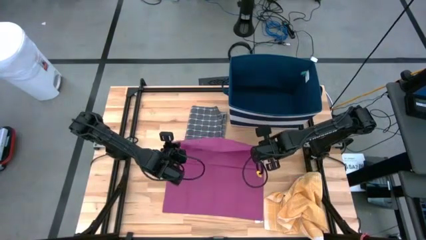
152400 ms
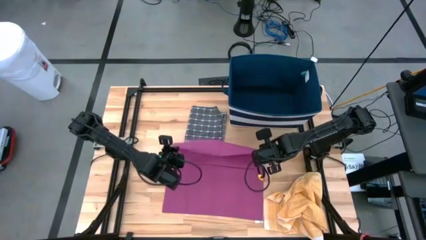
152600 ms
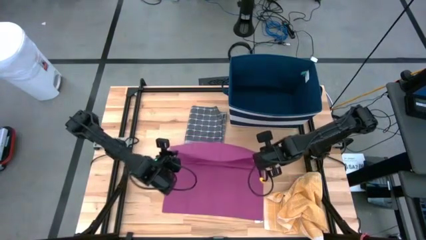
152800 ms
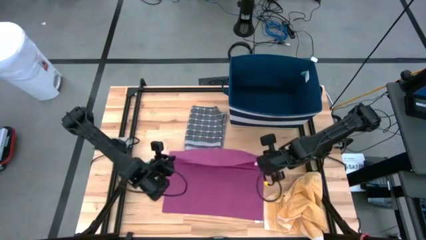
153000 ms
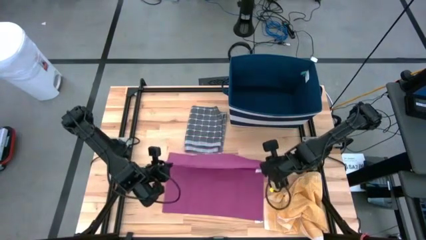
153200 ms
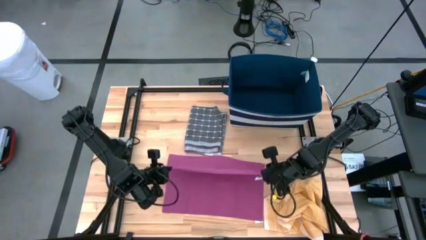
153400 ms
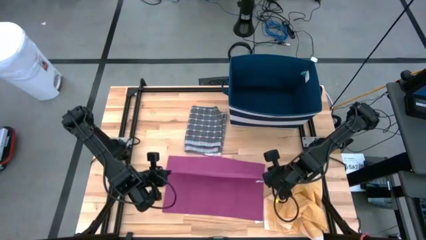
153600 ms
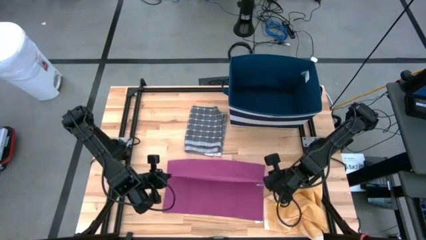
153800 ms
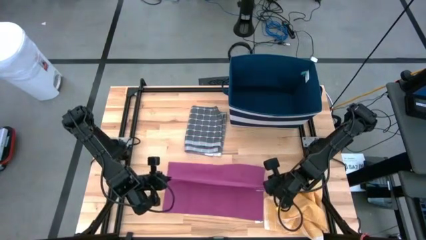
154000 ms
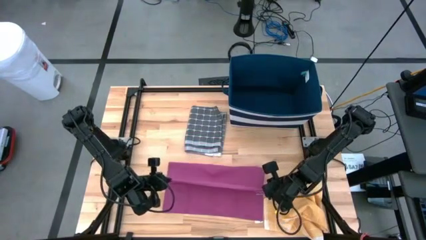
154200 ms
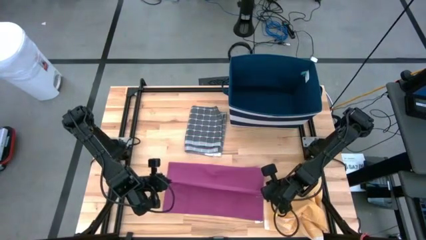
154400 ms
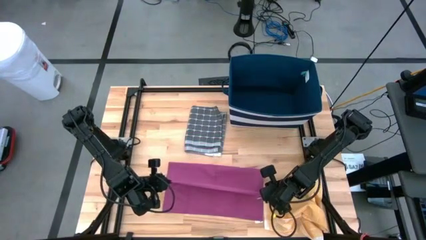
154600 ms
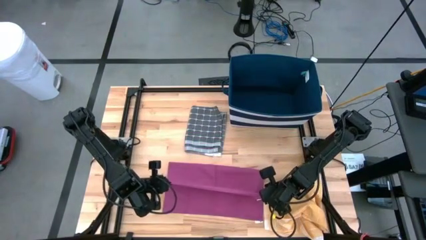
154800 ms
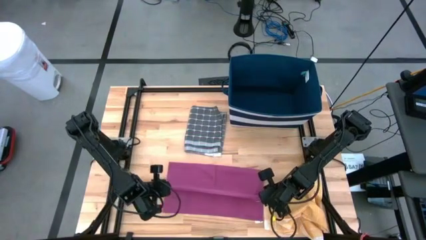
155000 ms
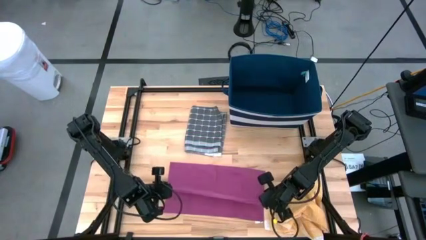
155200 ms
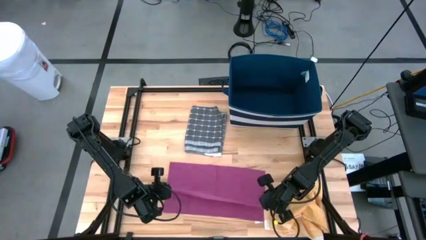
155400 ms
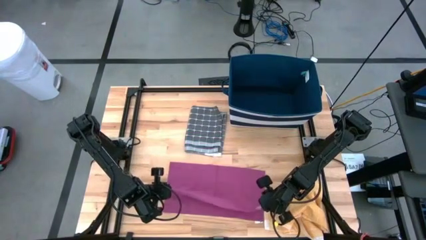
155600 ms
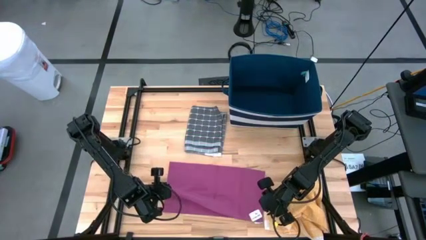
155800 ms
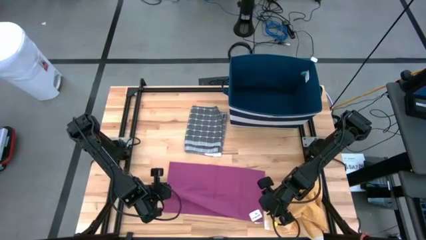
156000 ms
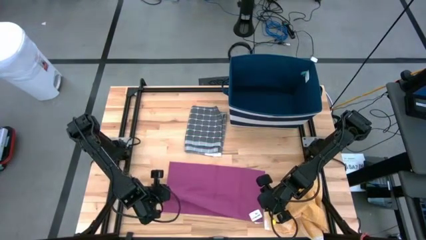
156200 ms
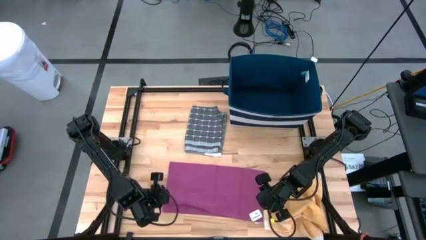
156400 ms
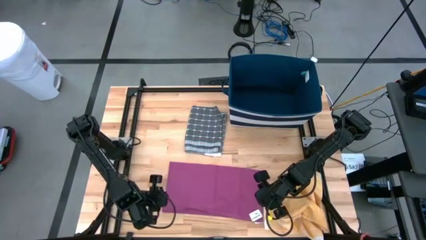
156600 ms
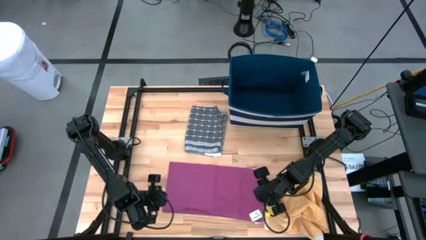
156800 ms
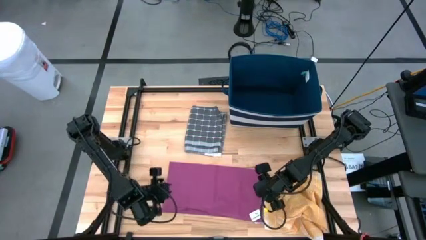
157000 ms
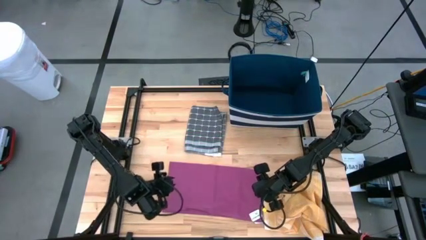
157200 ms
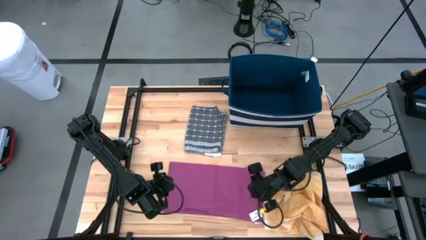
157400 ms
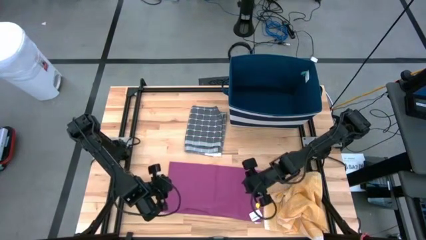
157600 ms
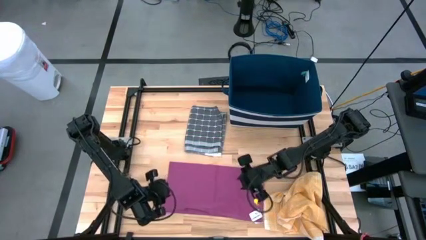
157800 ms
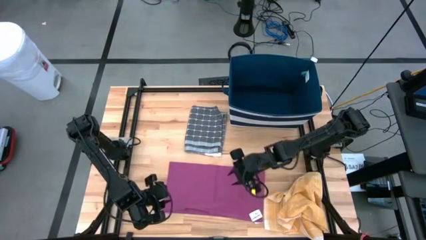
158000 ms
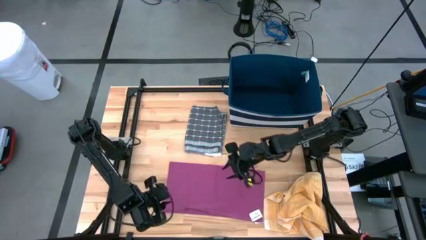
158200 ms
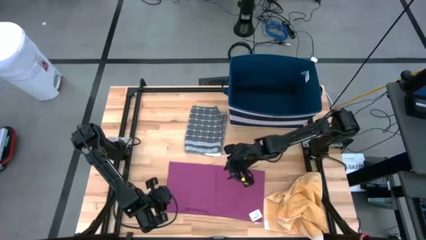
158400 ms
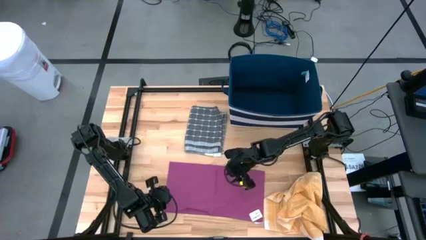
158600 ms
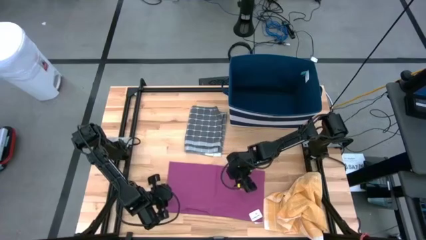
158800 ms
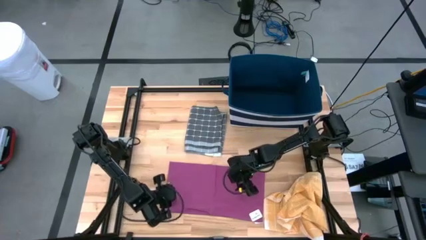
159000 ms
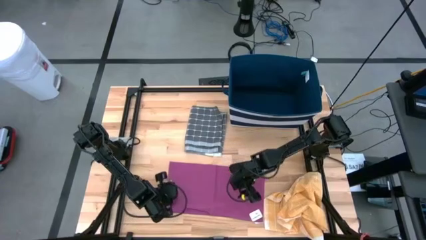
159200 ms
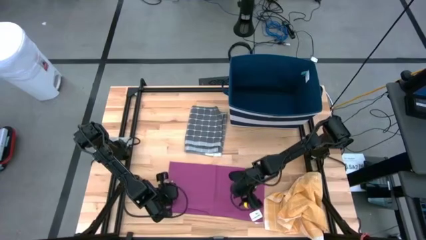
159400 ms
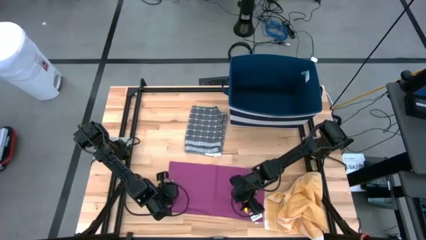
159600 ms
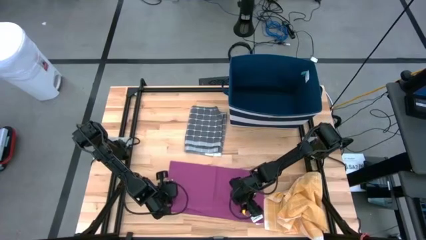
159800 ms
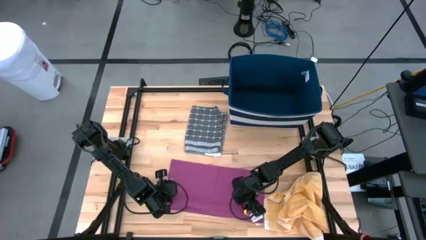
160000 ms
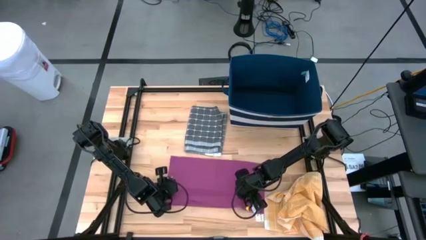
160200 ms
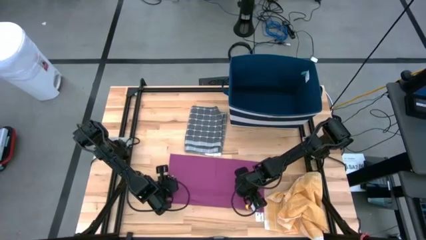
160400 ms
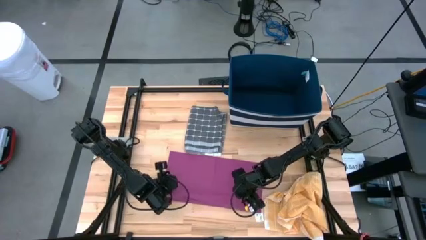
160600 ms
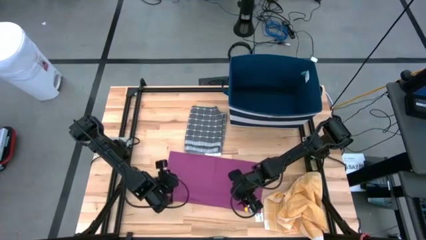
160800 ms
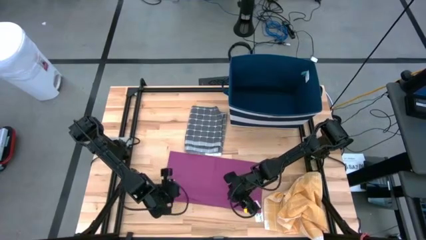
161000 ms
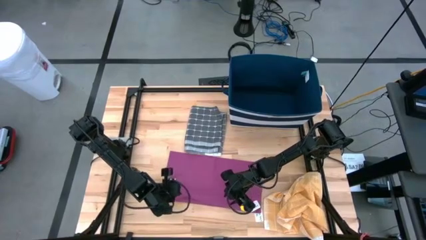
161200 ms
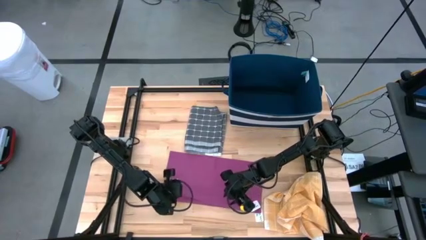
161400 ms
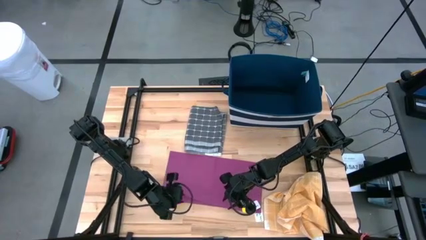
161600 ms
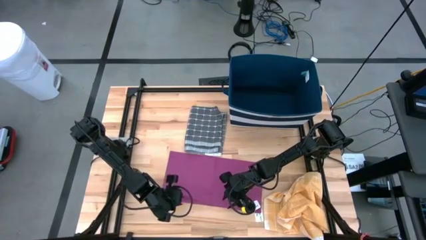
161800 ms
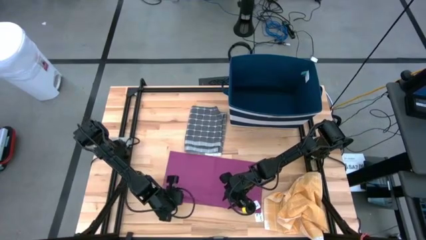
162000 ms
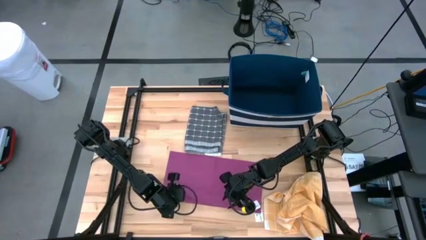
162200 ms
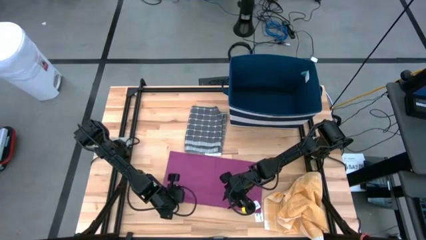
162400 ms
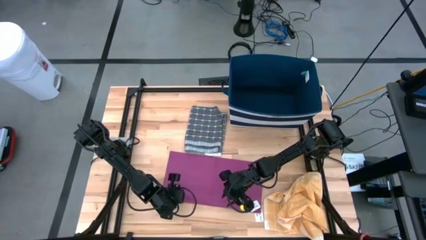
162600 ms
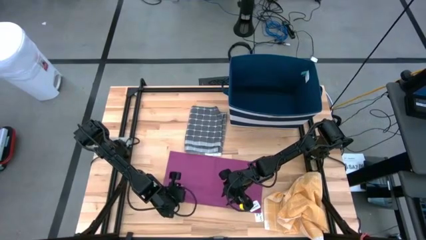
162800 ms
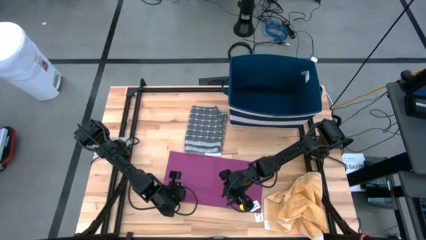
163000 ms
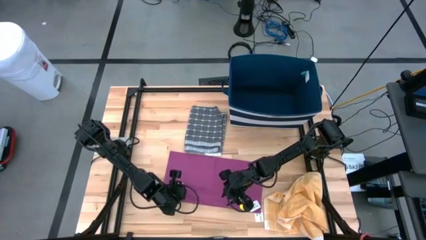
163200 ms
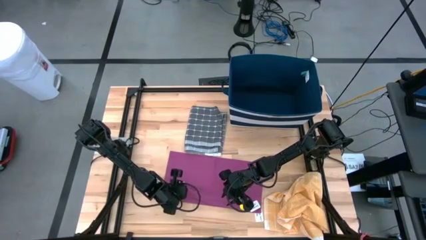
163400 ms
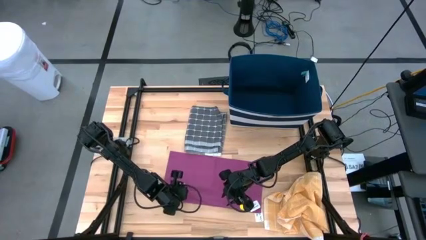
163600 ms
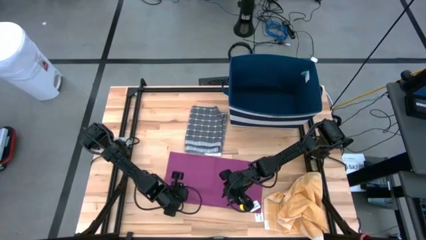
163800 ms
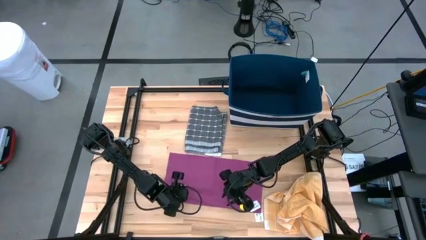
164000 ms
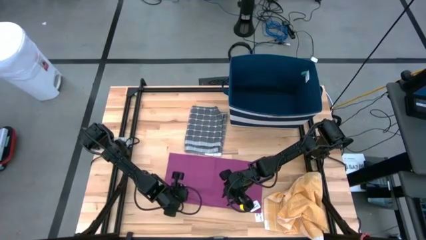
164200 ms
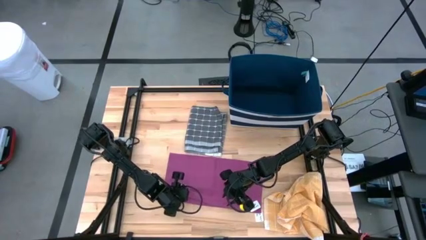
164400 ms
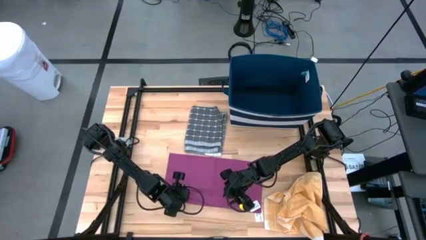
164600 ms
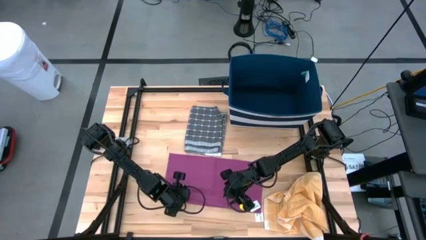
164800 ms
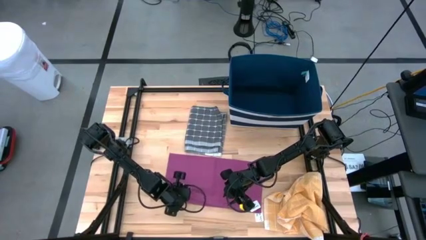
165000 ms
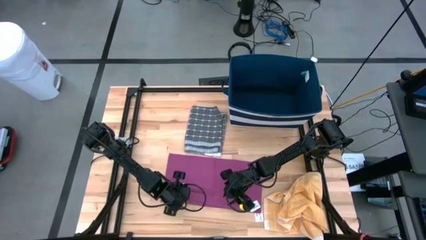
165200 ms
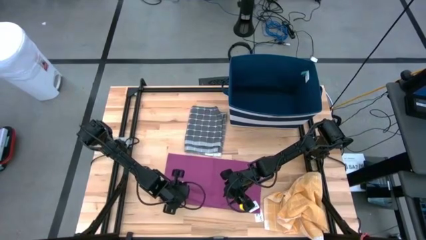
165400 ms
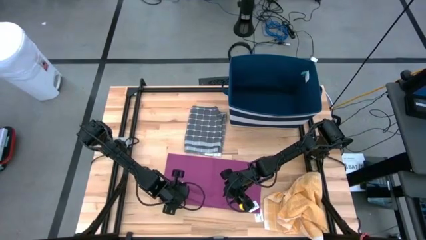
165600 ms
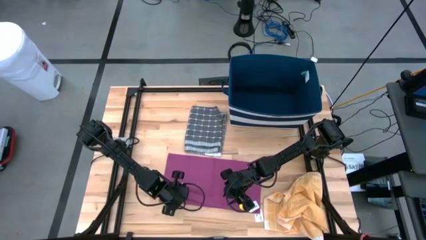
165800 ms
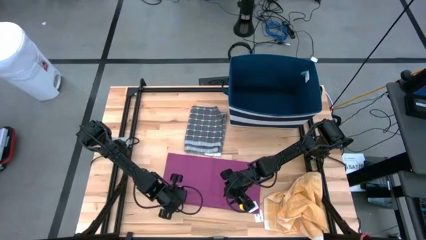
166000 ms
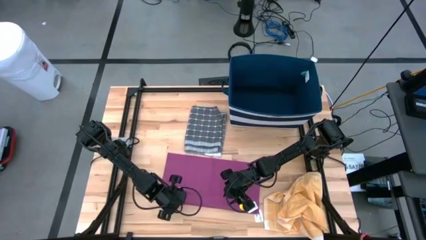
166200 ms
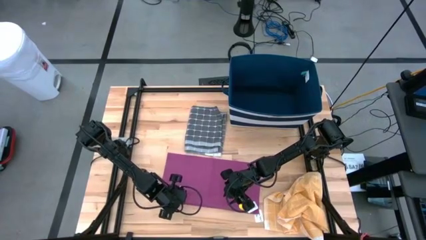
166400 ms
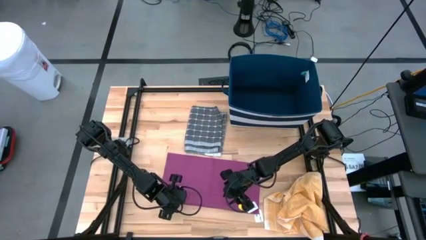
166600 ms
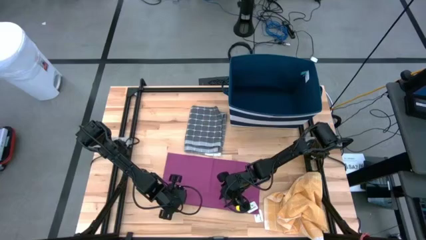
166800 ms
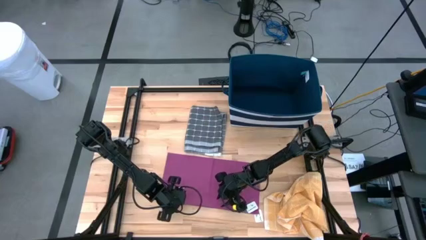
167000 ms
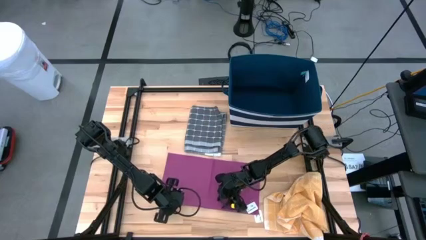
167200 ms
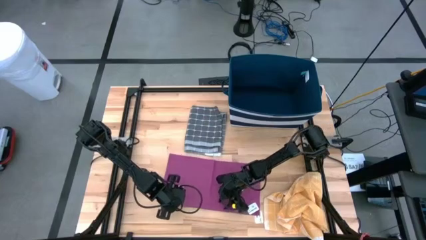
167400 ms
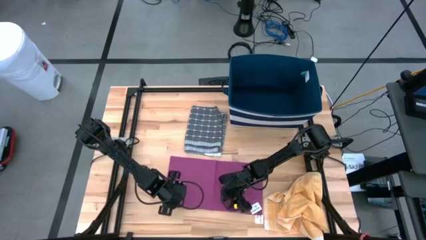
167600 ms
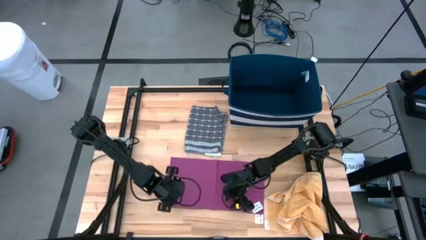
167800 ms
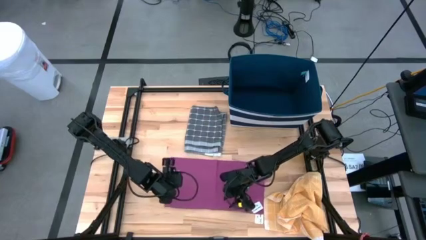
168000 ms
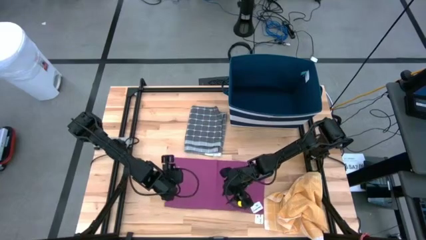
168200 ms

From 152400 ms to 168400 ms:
Task: Fold towel
Fold the pink towel
